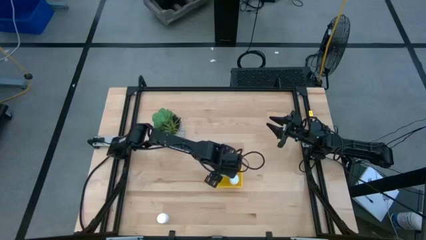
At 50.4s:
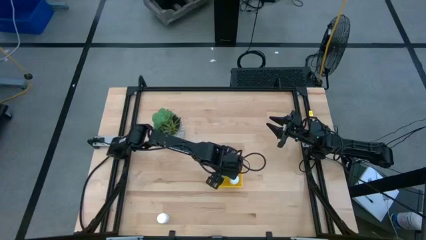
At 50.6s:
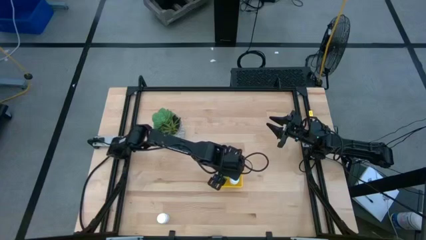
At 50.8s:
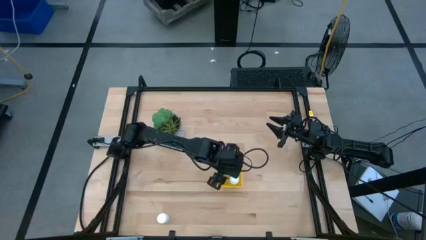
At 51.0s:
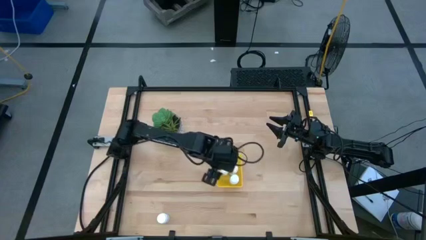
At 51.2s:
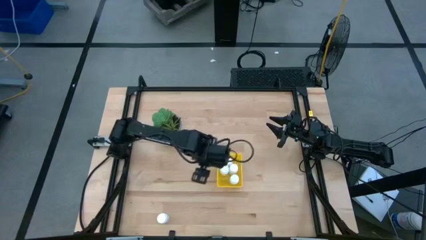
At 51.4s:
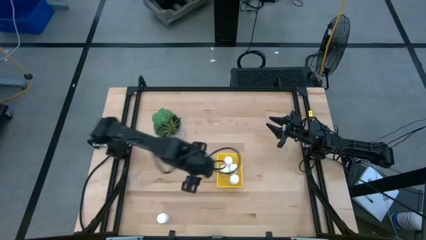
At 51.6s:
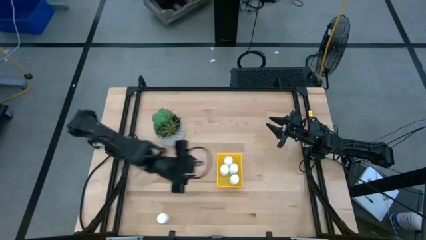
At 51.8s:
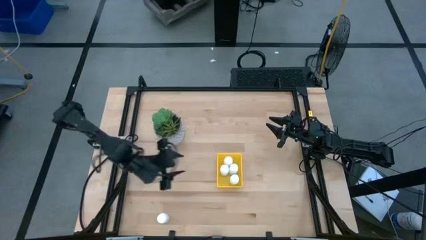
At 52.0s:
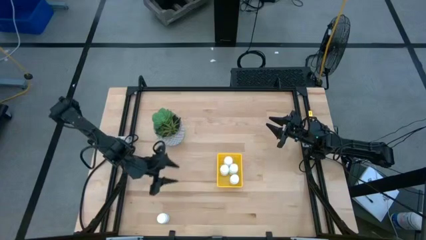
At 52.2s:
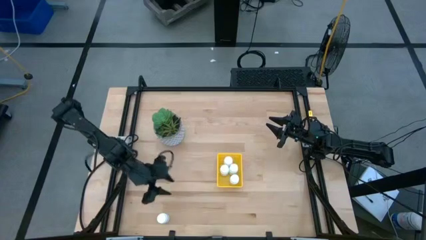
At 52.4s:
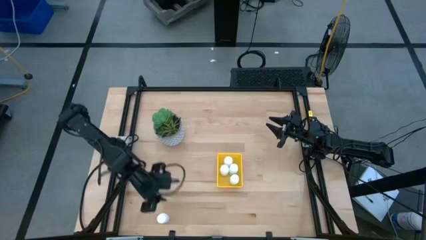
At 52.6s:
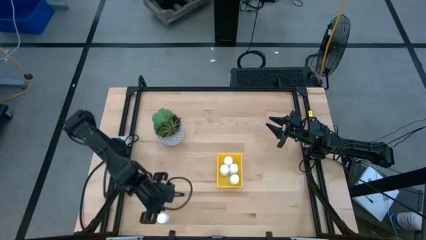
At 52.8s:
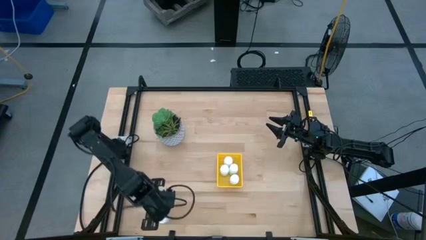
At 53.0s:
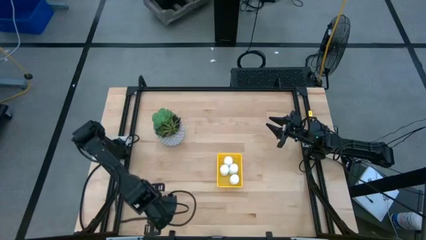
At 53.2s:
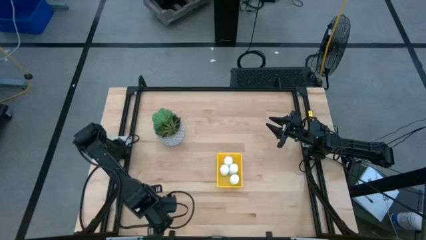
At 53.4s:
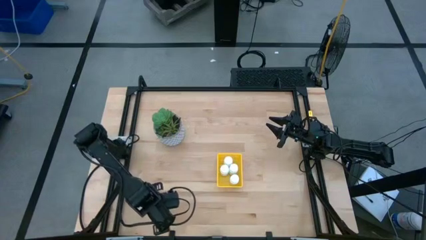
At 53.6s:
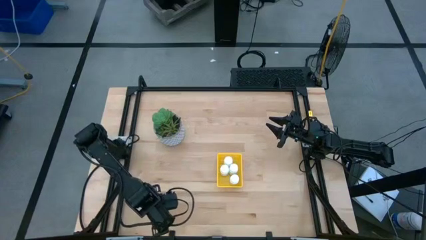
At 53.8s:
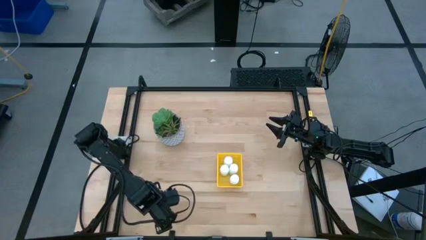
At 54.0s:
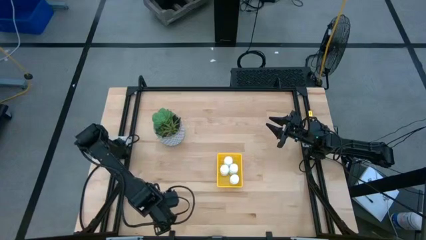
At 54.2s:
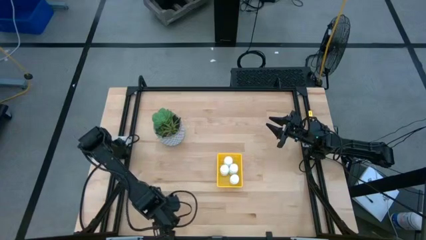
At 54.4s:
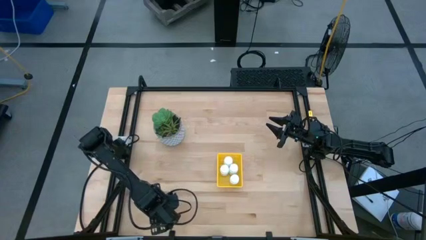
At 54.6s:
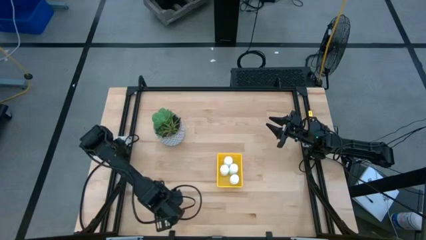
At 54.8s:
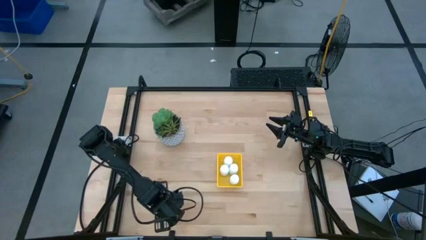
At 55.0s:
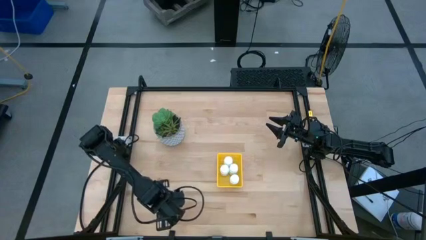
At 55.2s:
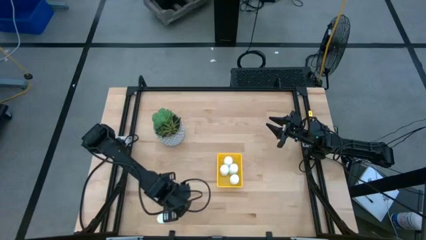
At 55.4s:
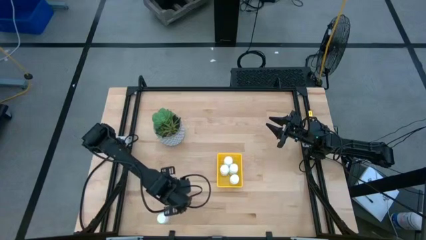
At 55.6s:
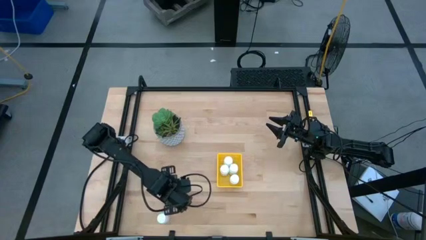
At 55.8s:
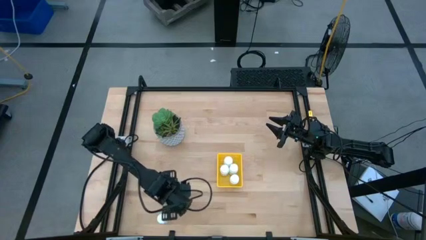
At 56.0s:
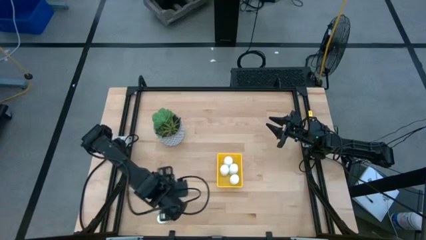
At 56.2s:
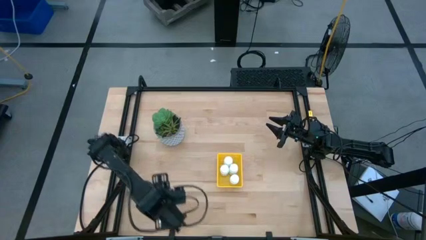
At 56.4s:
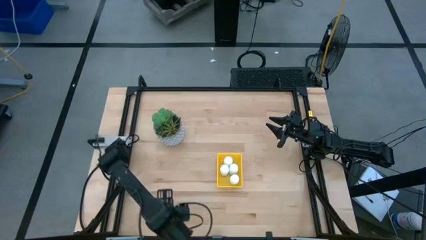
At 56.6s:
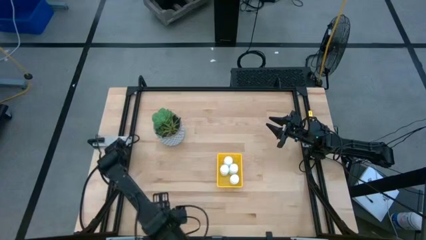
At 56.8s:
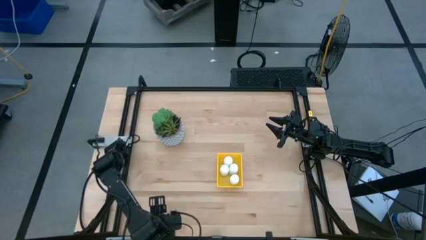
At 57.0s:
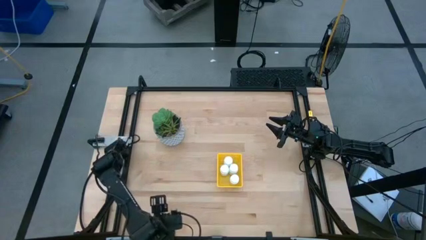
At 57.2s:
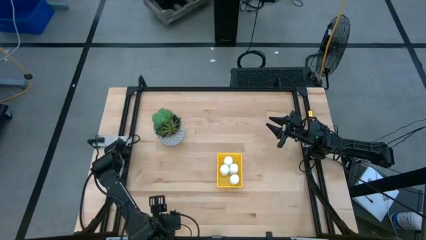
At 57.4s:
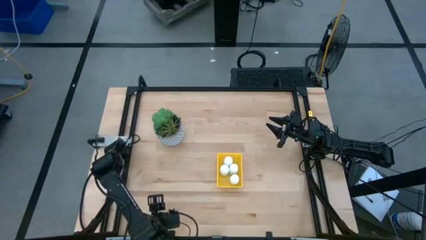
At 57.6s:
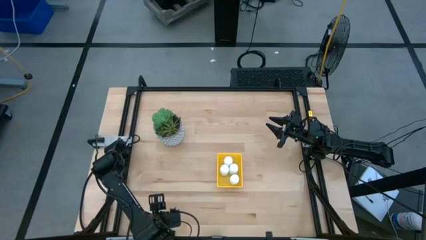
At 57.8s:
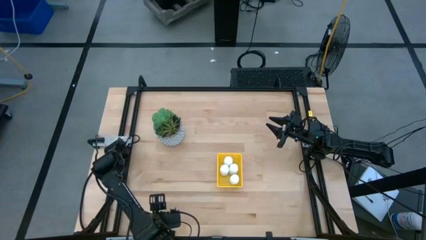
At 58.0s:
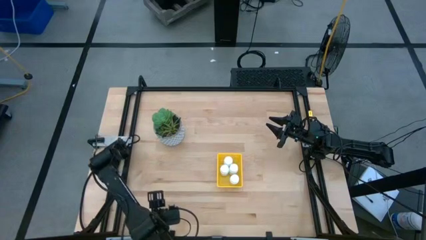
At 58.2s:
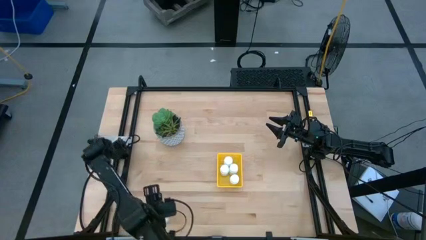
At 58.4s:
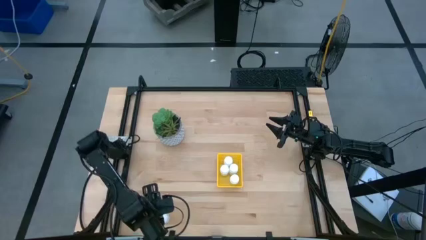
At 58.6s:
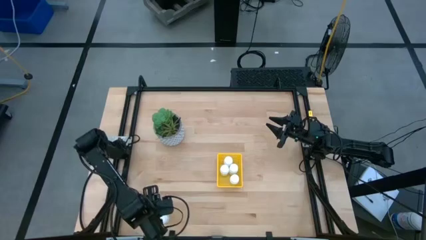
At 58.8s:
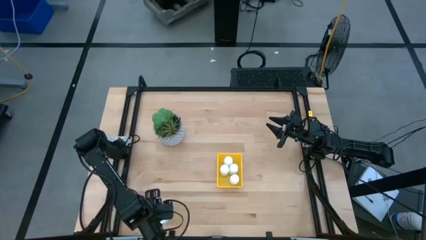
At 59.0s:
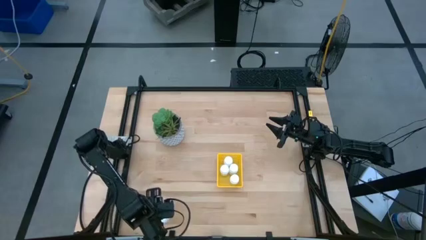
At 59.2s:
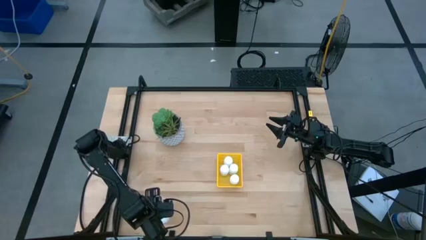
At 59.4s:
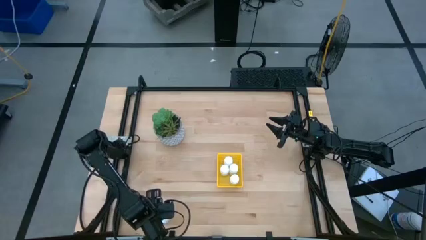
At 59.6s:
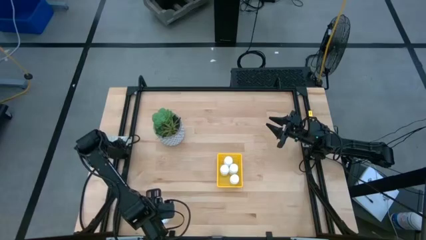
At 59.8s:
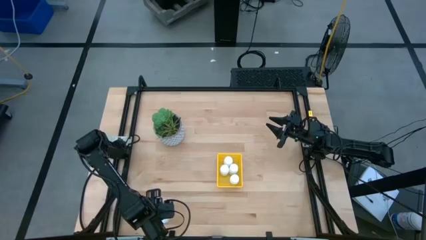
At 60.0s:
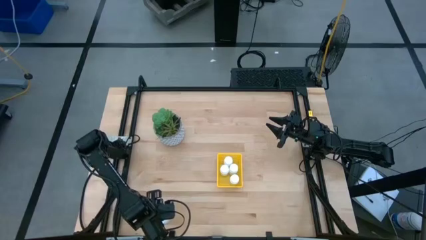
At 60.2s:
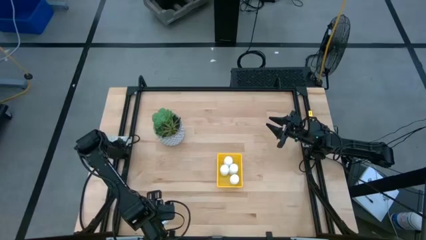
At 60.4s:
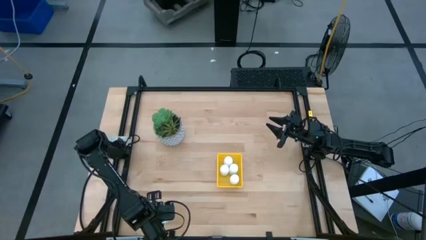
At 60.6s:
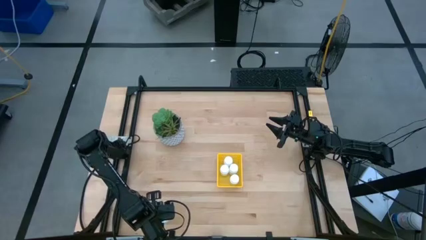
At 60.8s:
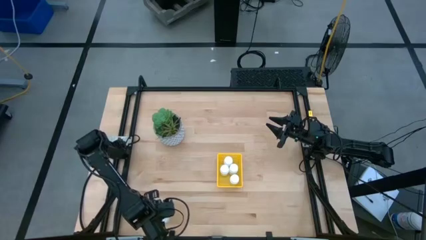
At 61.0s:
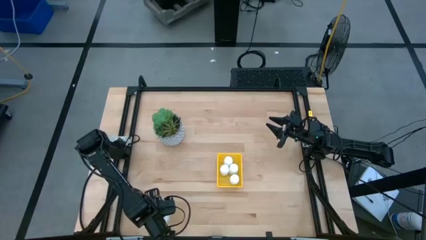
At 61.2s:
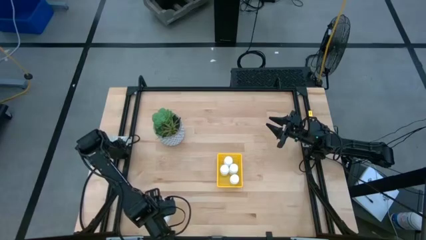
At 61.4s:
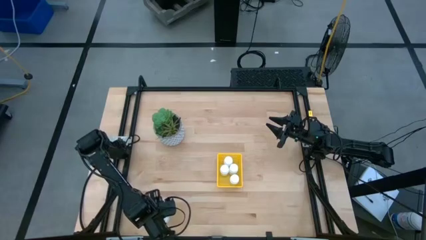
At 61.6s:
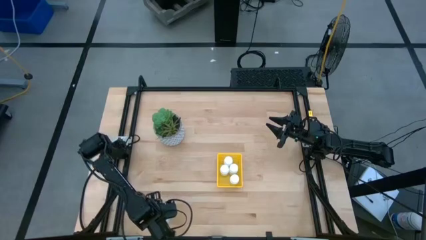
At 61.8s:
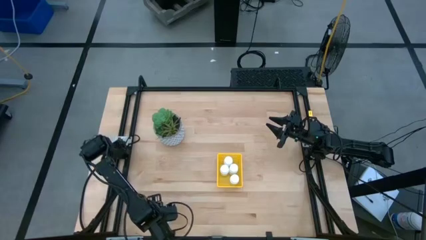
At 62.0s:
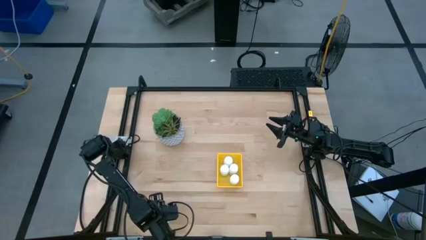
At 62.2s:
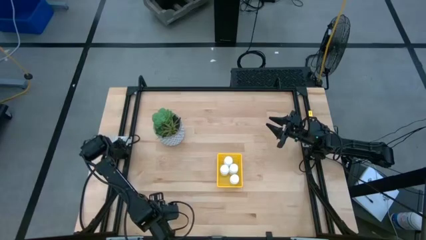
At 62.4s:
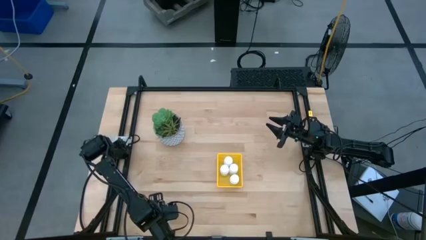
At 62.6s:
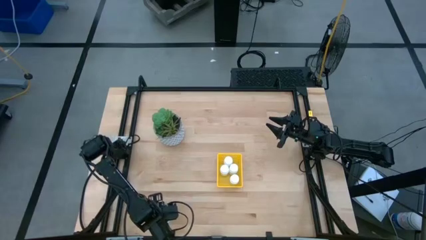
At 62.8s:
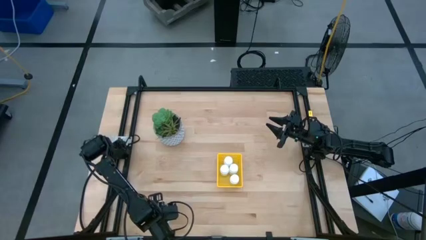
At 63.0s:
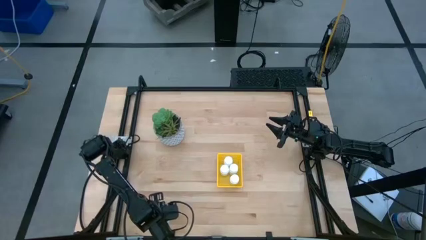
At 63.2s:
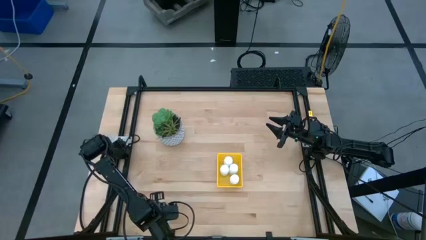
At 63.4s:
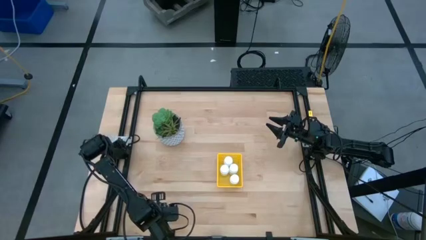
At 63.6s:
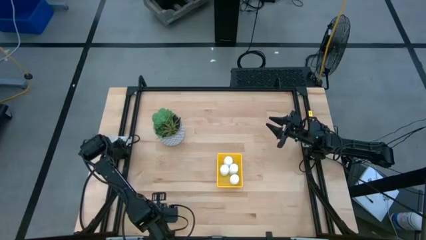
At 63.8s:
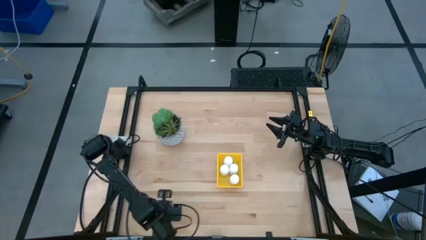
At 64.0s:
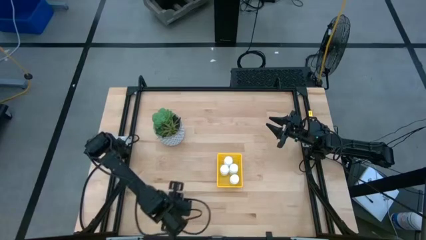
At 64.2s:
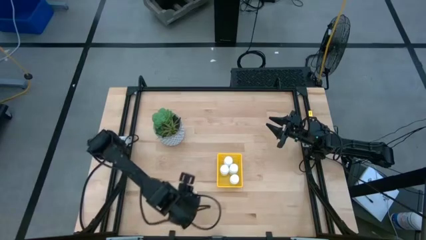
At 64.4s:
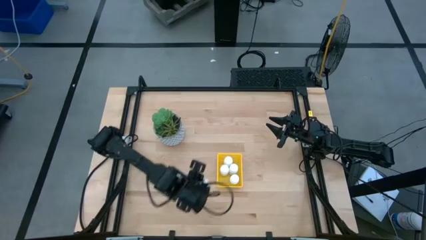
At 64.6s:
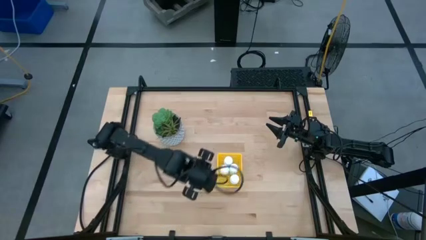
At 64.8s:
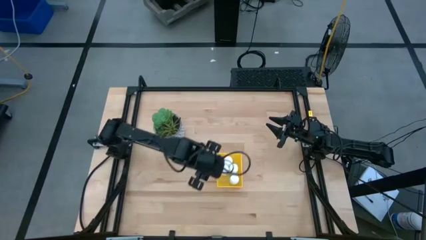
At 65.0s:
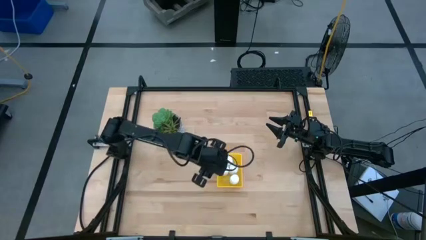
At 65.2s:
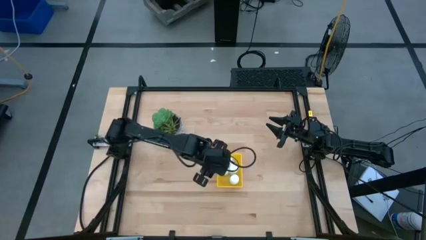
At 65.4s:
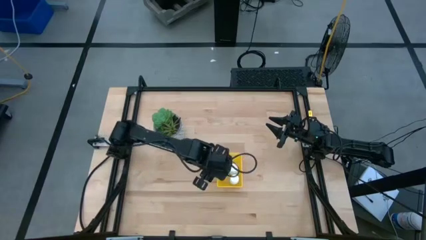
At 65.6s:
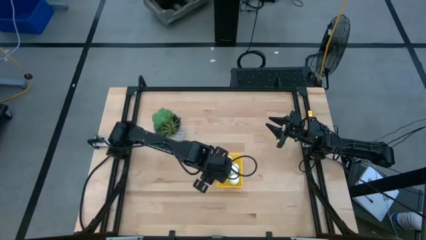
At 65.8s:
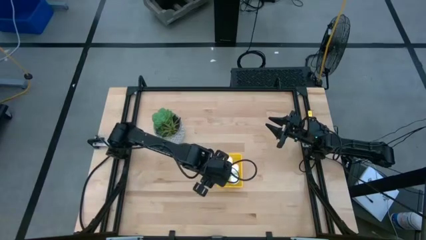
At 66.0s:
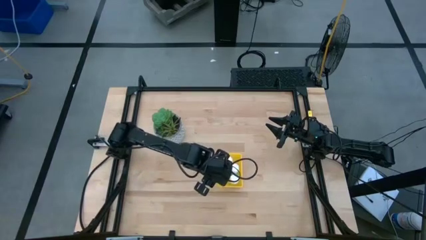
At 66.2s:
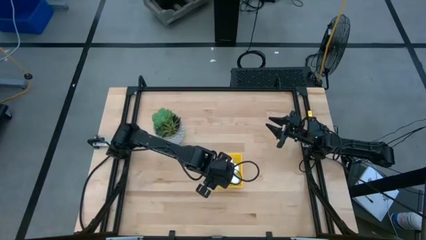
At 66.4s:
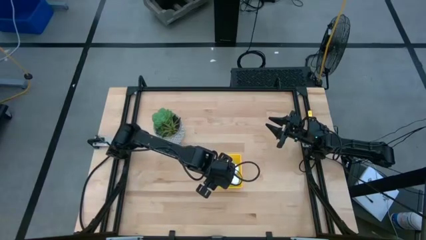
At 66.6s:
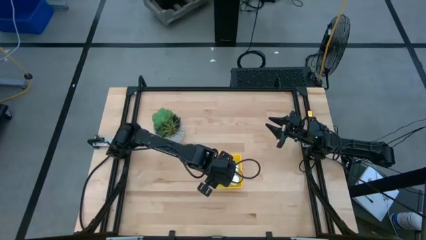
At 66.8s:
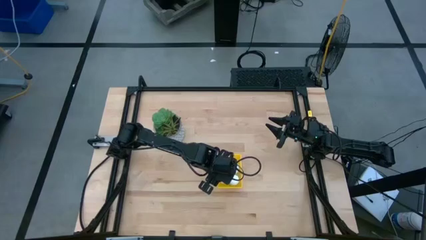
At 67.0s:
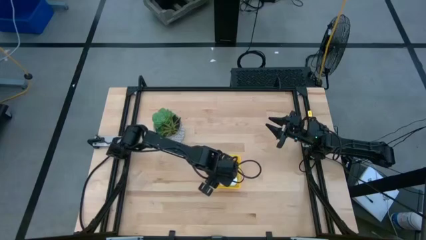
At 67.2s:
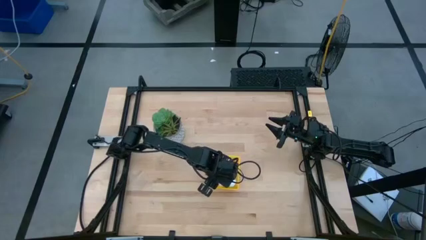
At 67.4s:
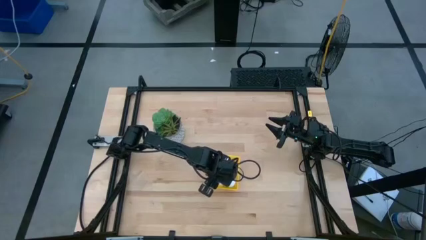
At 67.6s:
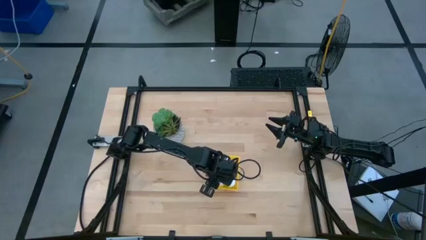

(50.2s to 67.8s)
Task: Pick and place pill bottles into a basket
Put the pill bottle into the basket
